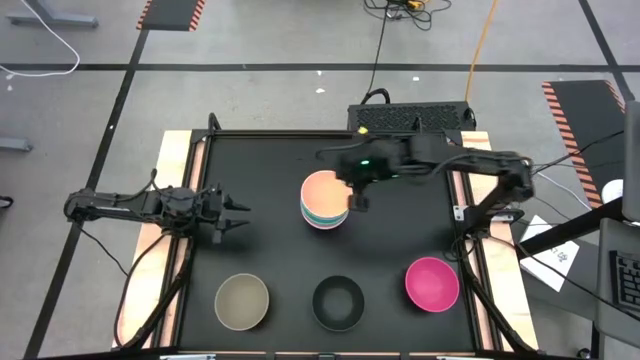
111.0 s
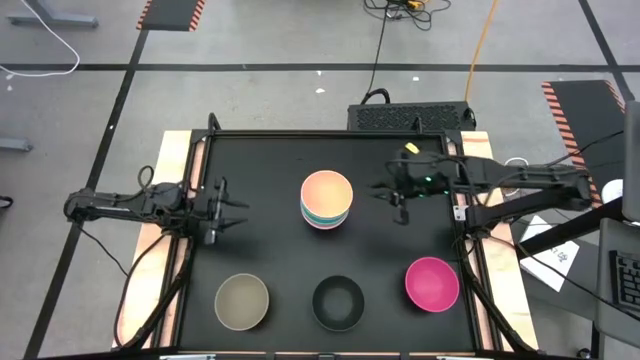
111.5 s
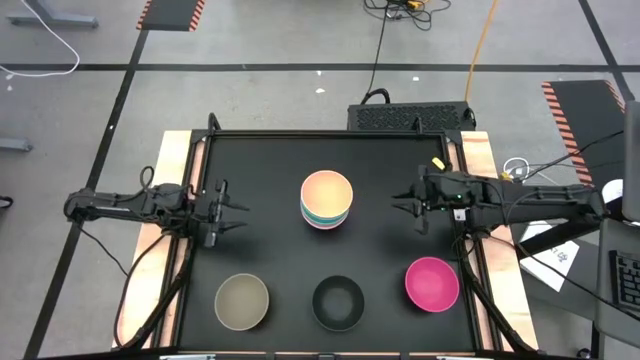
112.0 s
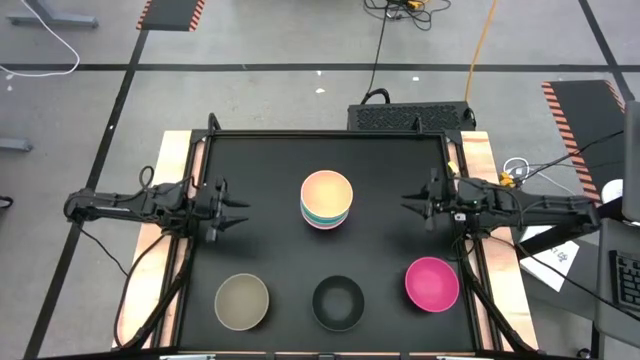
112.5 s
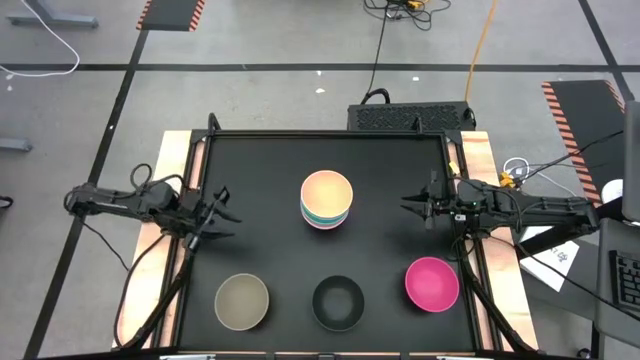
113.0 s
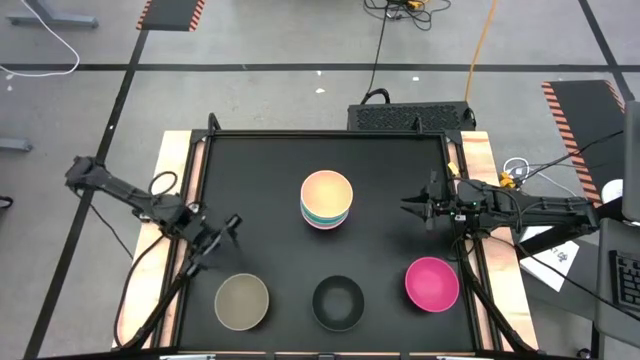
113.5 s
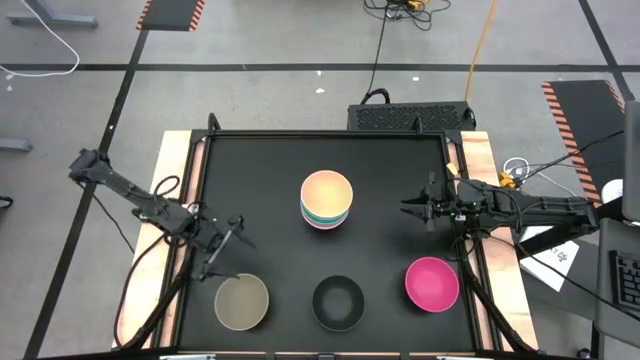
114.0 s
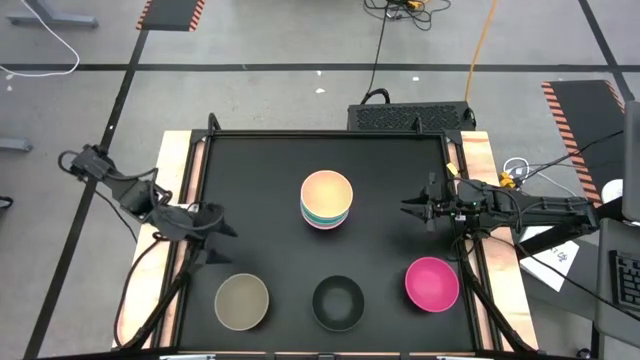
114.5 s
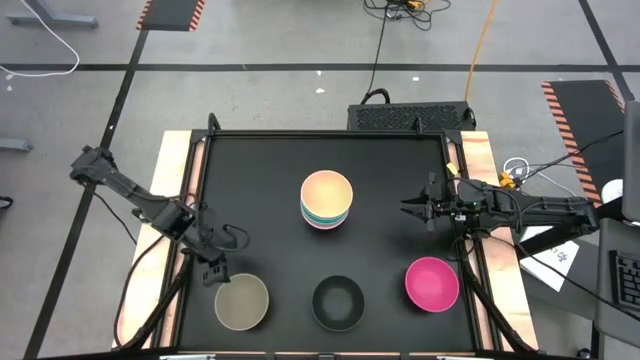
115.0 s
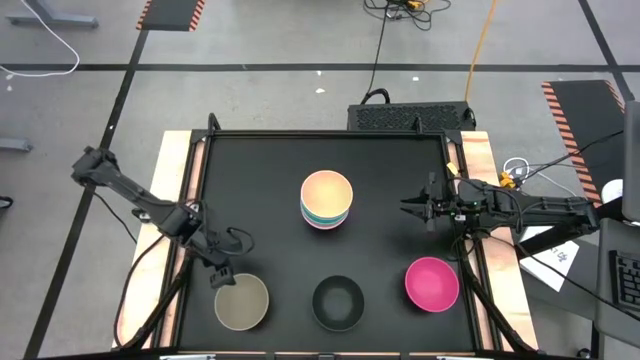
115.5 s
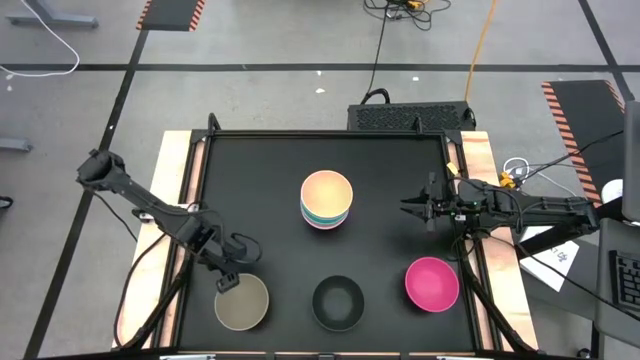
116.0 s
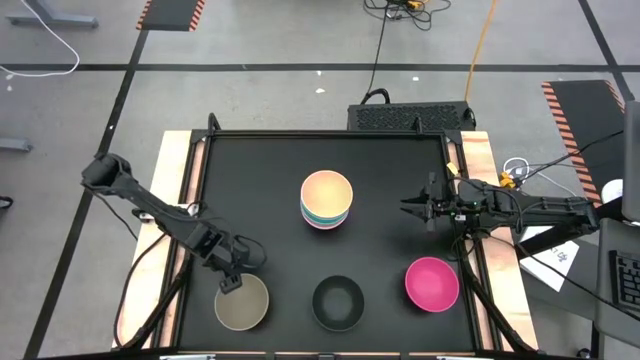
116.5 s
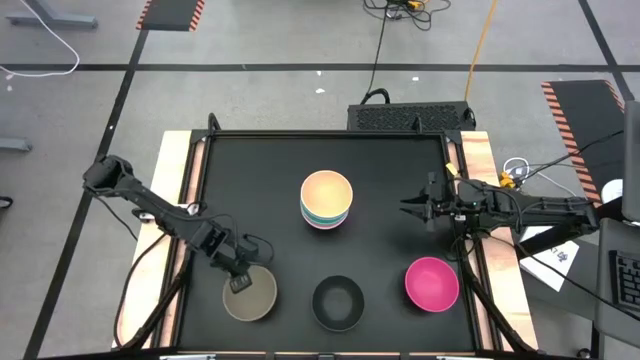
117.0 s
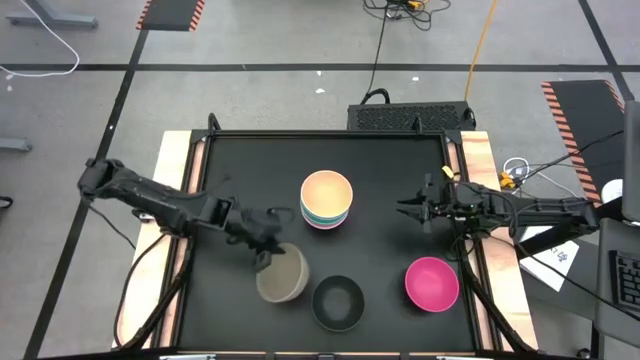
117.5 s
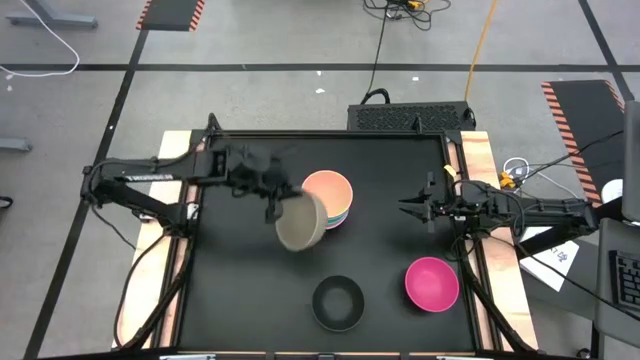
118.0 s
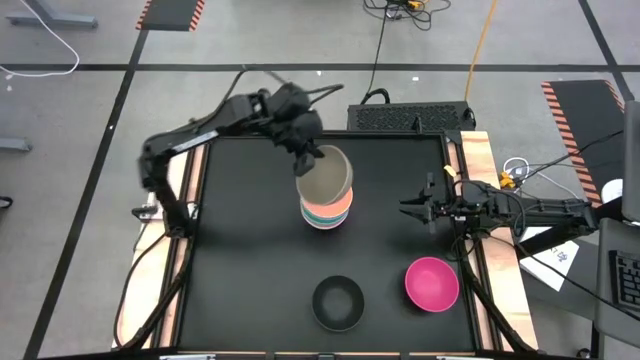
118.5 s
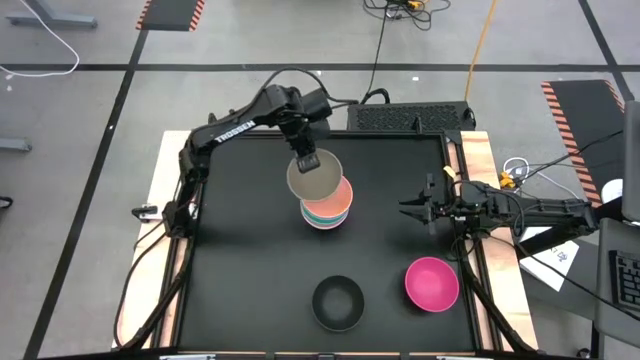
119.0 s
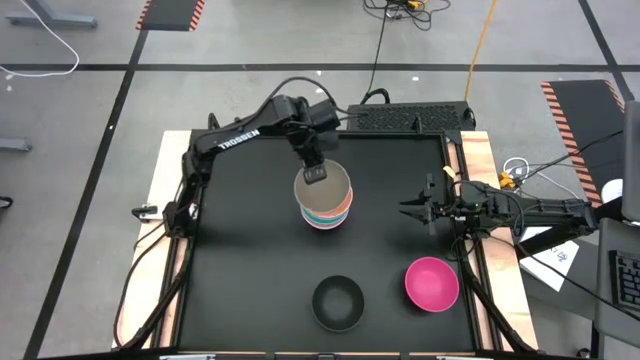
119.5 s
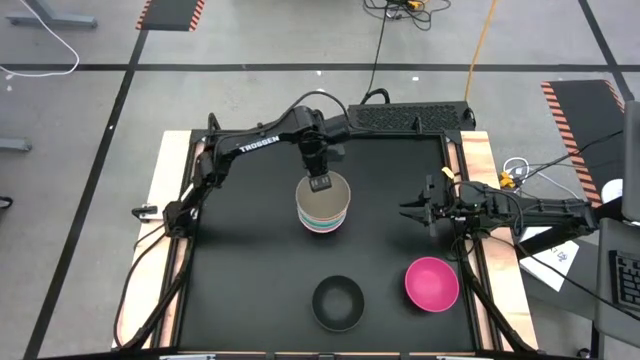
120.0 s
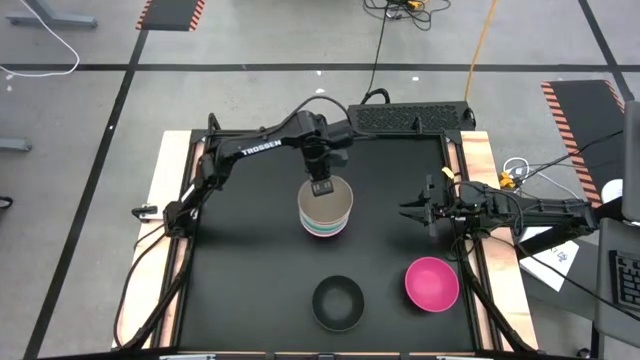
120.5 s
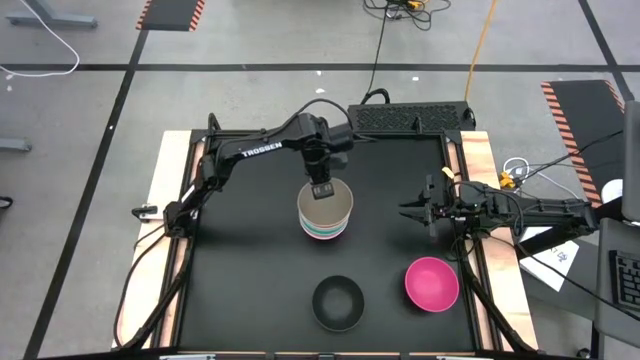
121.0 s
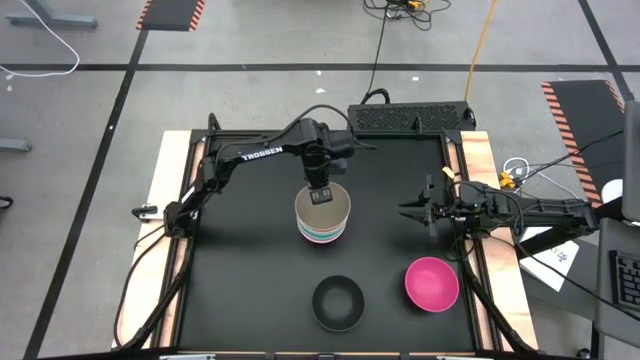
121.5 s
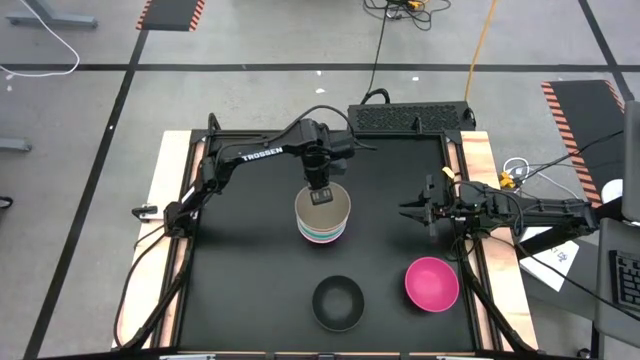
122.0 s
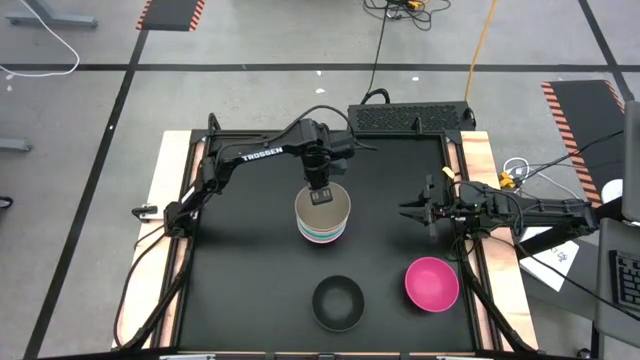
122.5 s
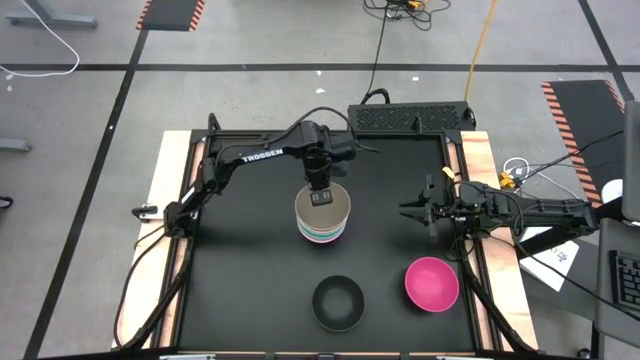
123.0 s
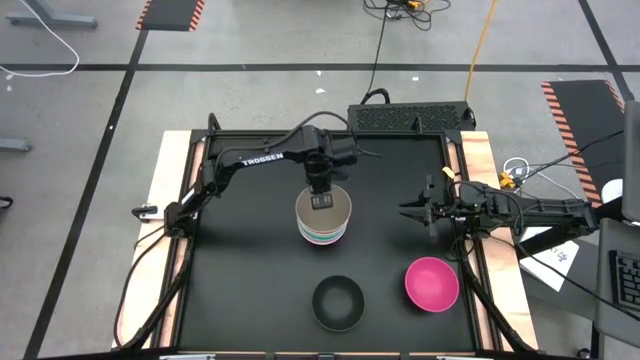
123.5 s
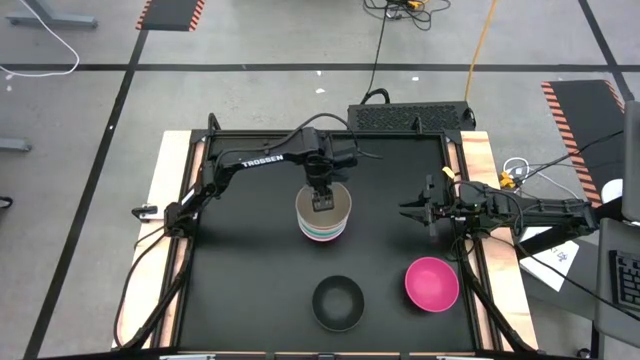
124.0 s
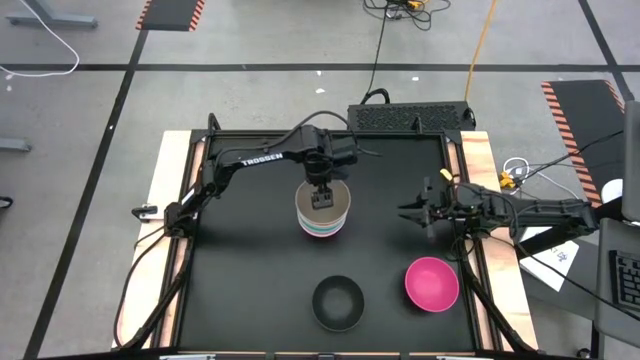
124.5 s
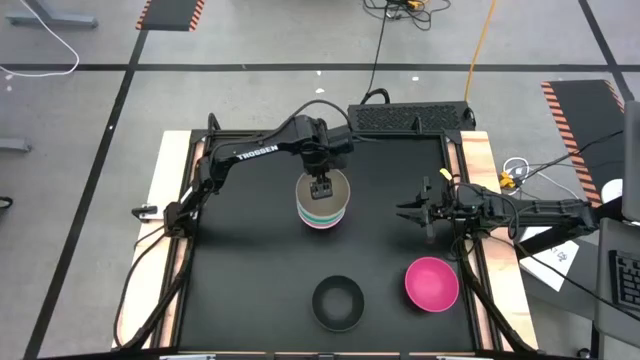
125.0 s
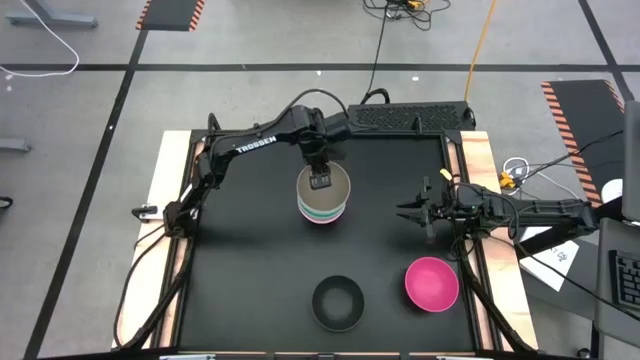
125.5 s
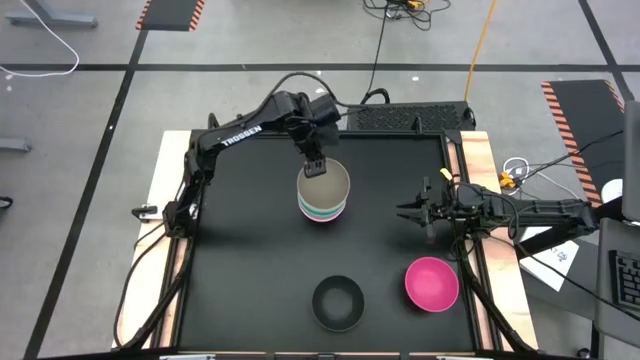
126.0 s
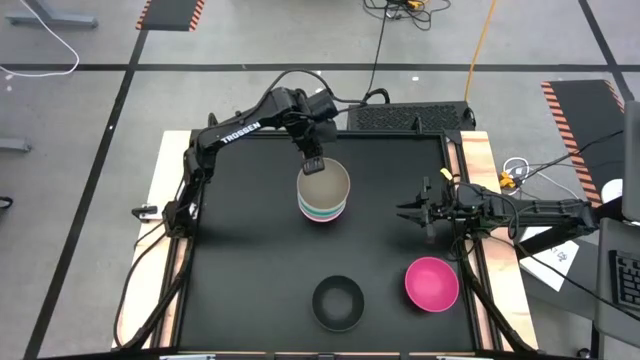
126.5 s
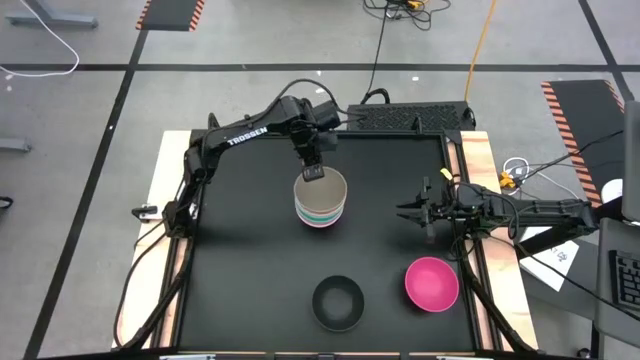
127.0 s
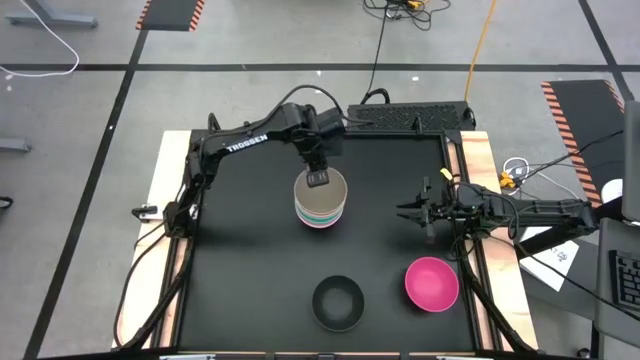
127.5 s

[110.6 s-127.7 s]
Task: Nest bowls inside each other
Stack the gray bowl on top of the light orange bowl

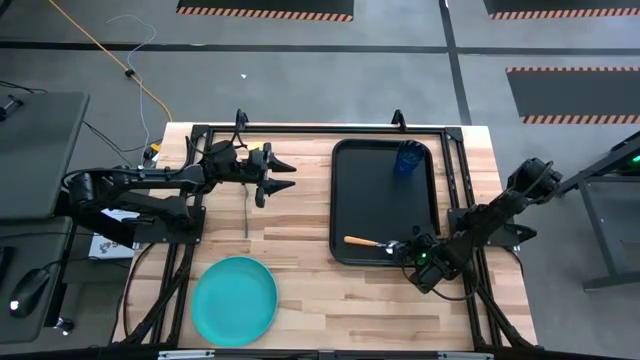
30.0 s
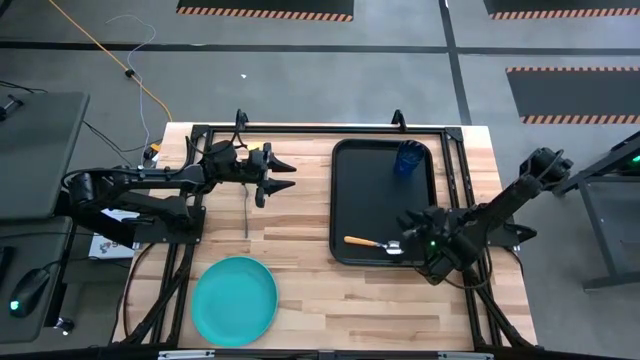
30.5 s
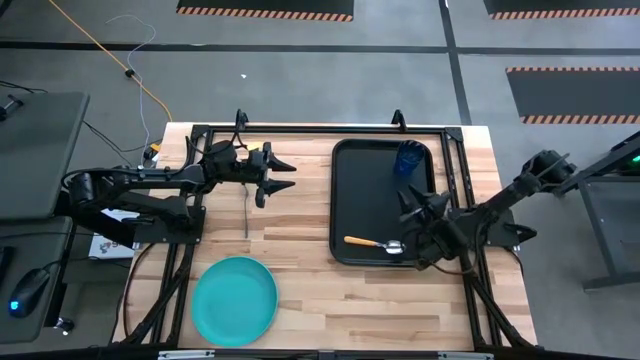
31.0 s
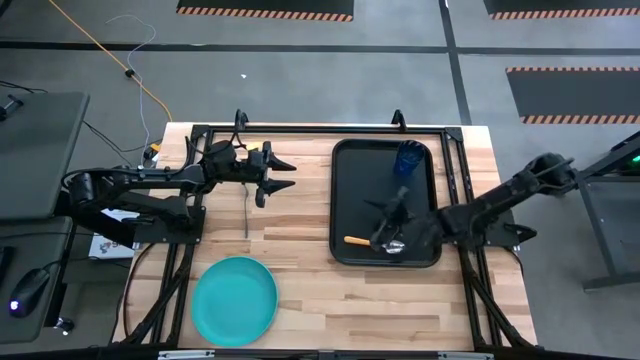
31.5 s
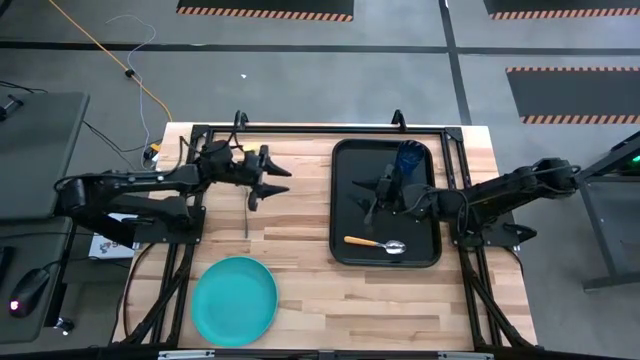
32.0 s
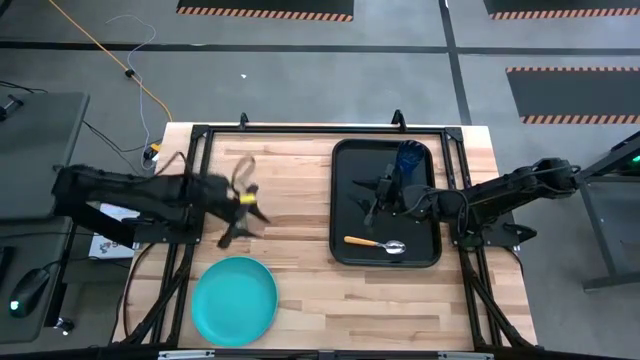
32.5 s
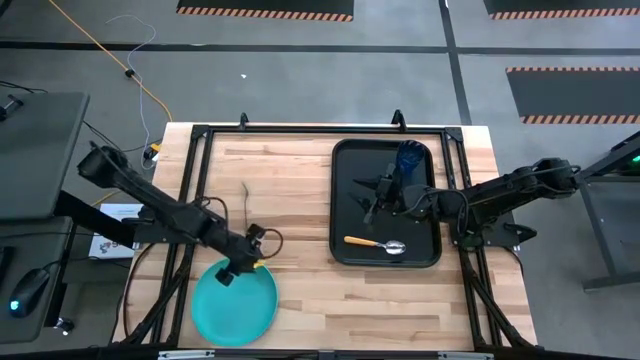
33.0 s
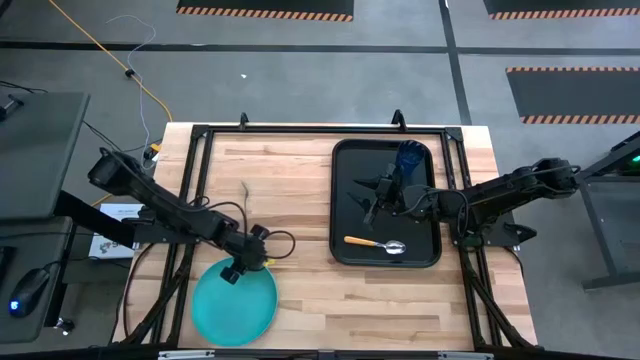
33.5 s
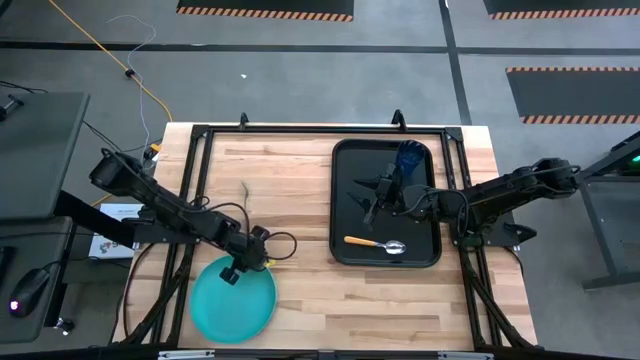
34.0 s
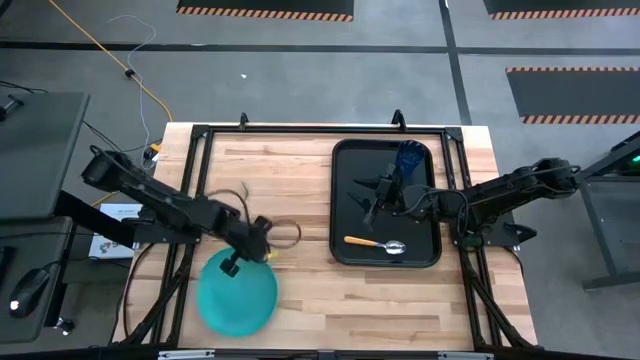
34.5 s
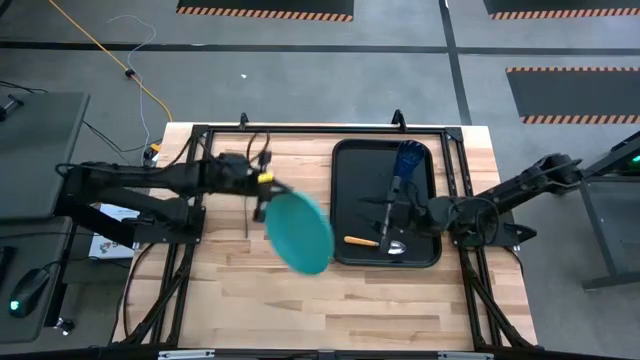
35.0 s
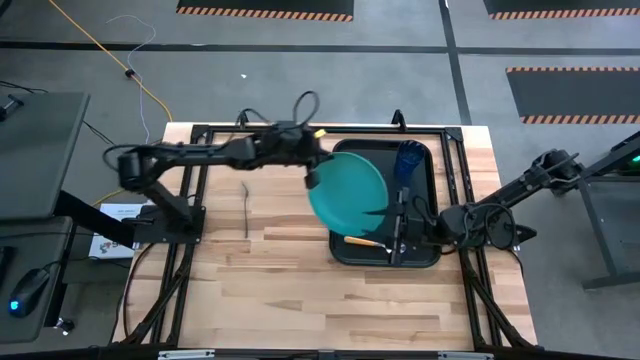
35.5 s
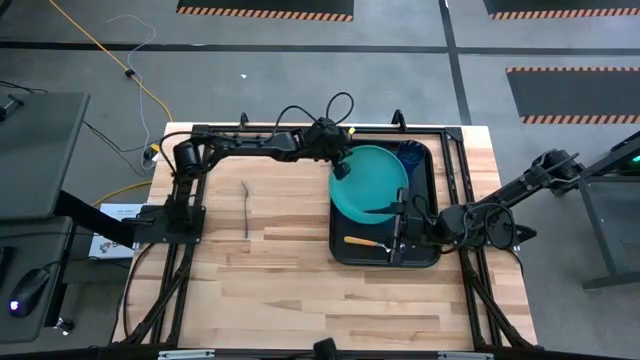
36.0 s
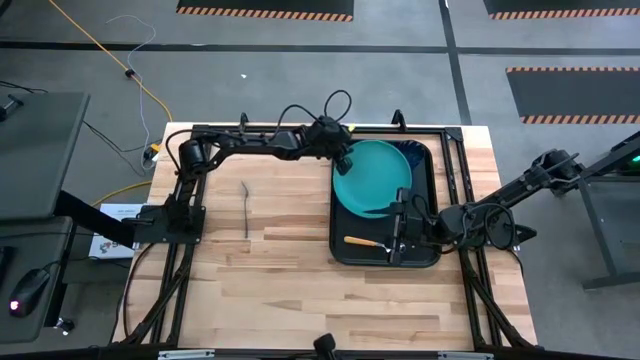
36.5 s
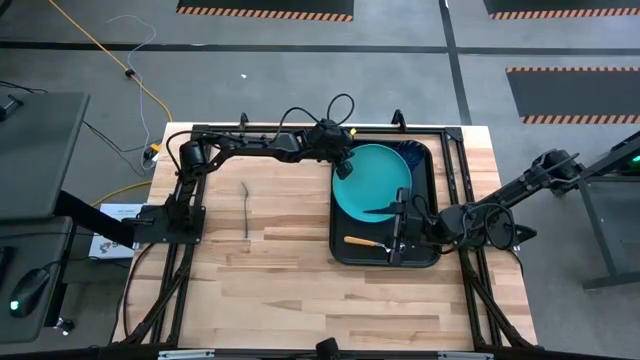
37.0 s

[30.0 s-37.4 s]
Task: Pick and place plate/cup/fork/spoon on tray
Put the green plate at the center of the the black serving tray
